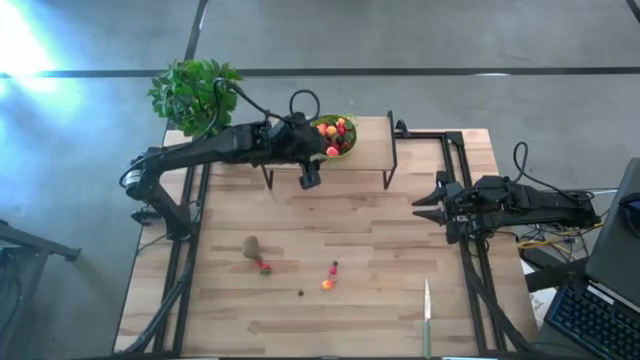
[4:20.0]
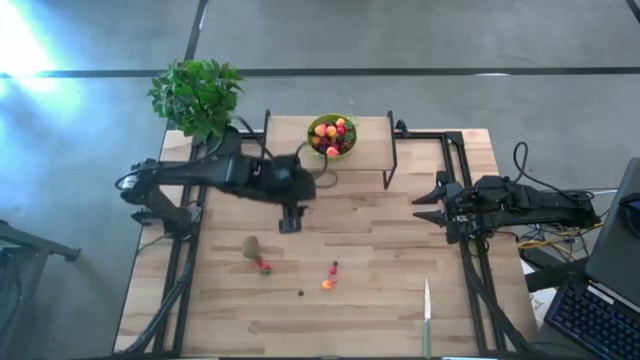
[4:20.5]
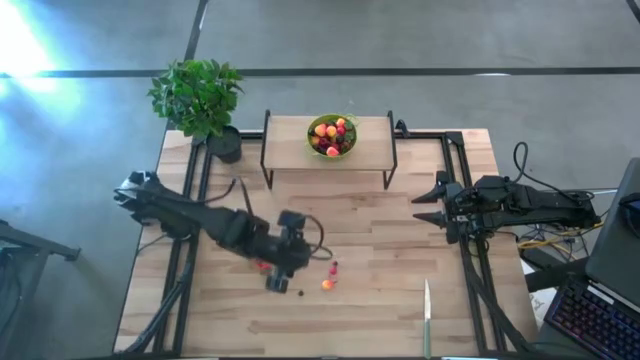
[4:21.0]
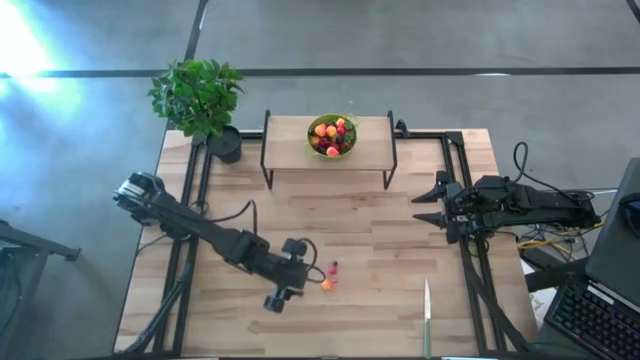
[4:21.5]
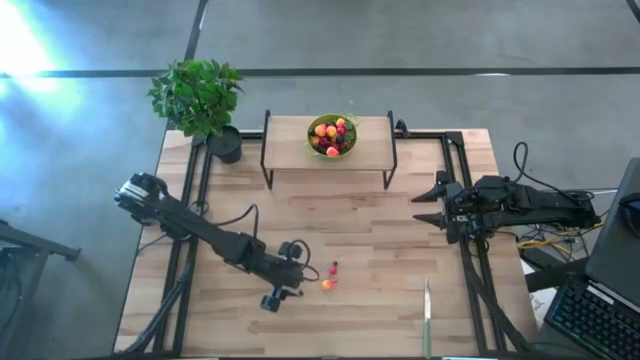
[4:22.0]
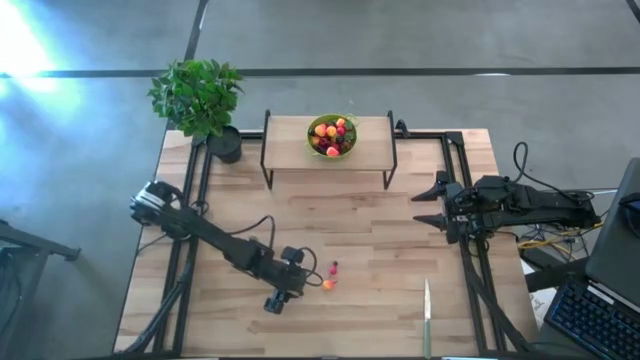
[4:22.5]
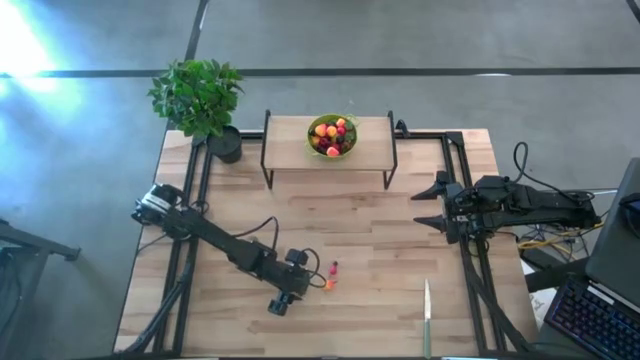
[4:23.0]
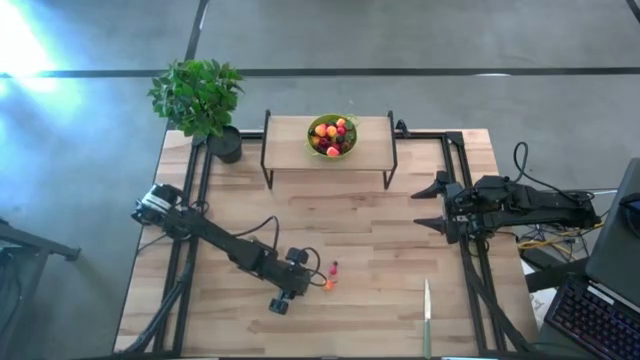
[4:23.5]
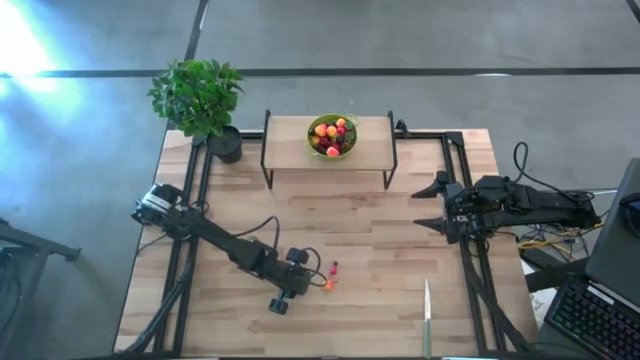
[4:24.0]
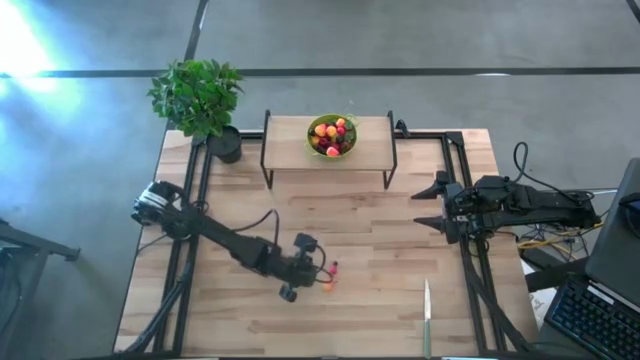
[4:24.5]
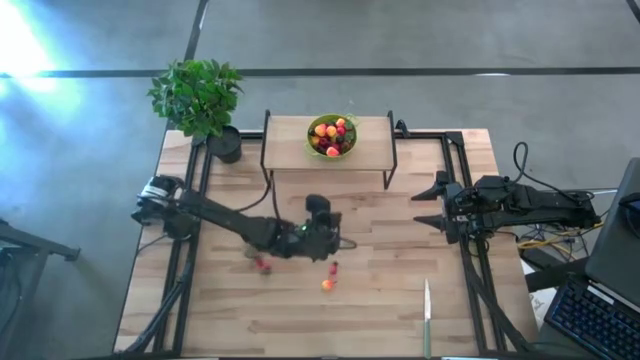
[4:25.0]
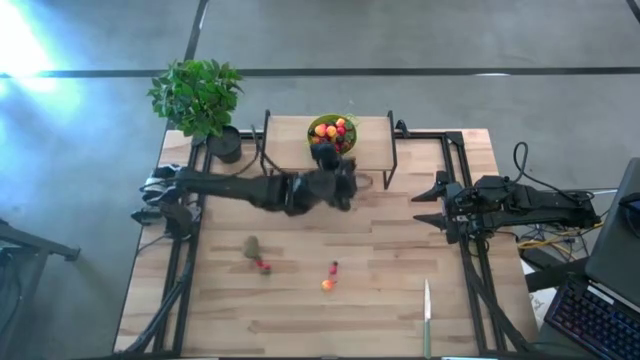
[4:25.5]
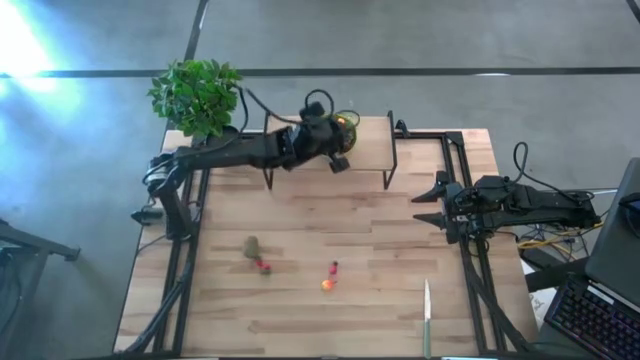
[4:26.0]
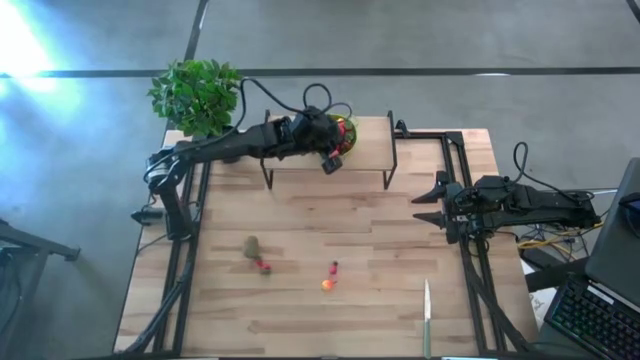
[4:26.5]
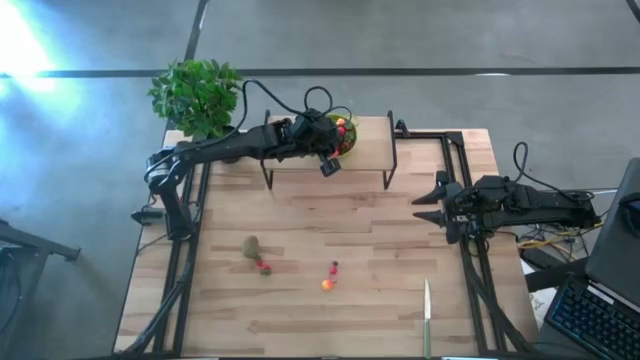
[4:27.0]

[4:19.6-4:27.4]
Task: Pick & Place Fruit
Put the blueberry into the green strainer bowl on the shelf

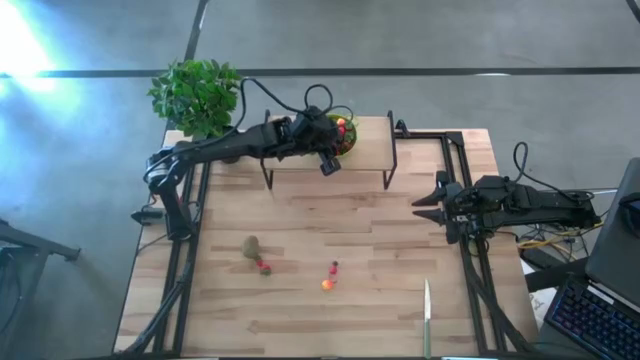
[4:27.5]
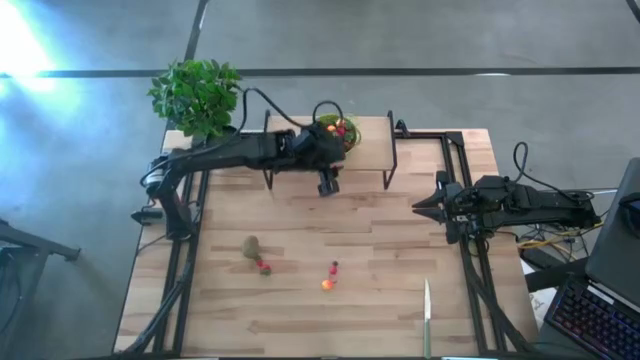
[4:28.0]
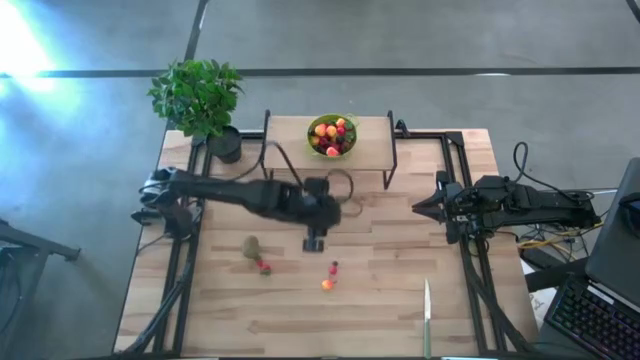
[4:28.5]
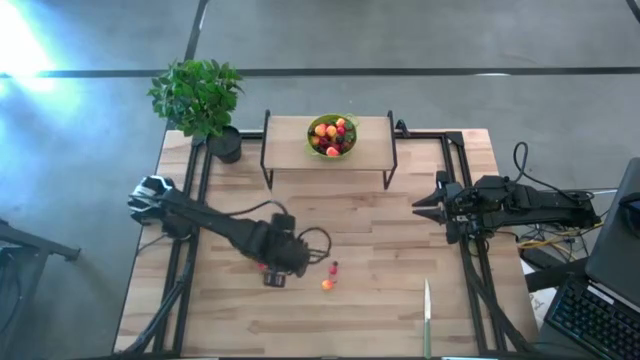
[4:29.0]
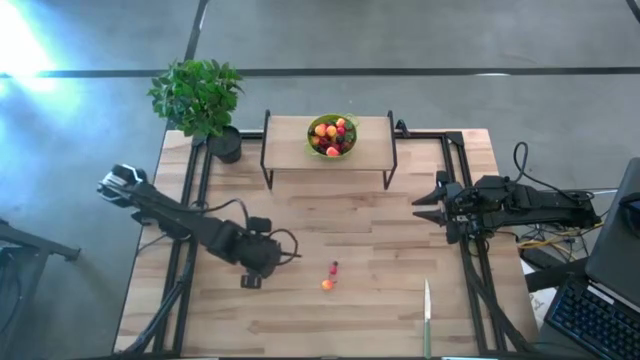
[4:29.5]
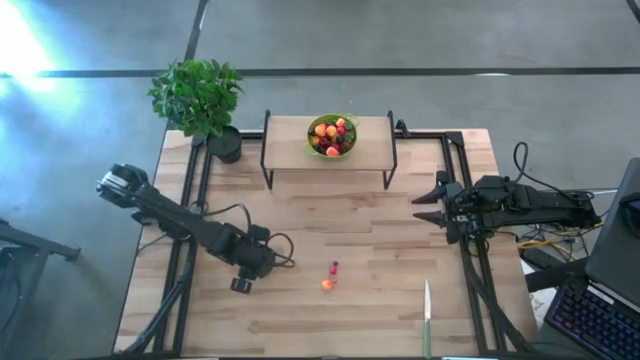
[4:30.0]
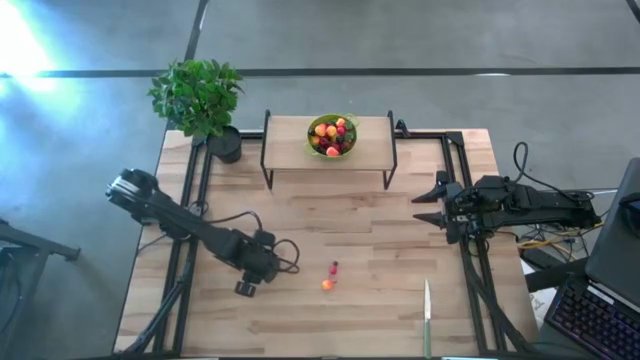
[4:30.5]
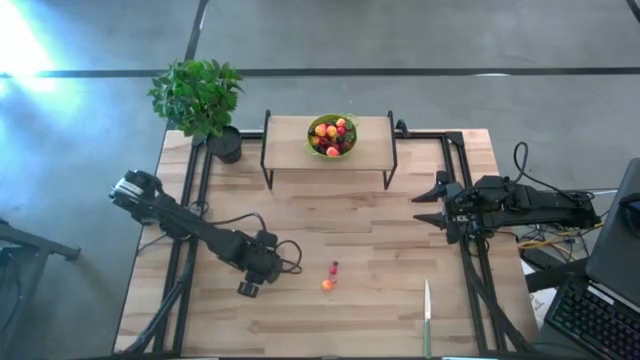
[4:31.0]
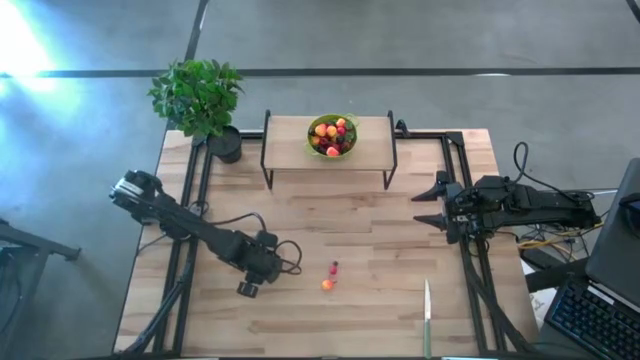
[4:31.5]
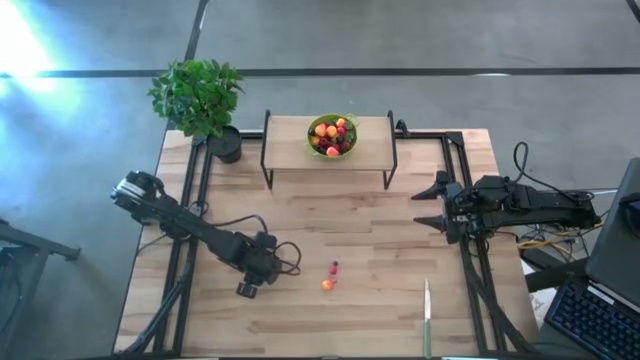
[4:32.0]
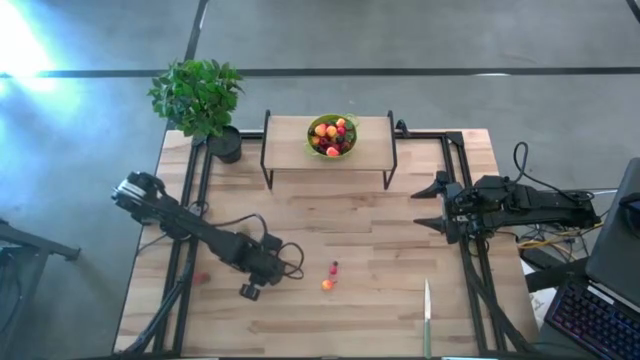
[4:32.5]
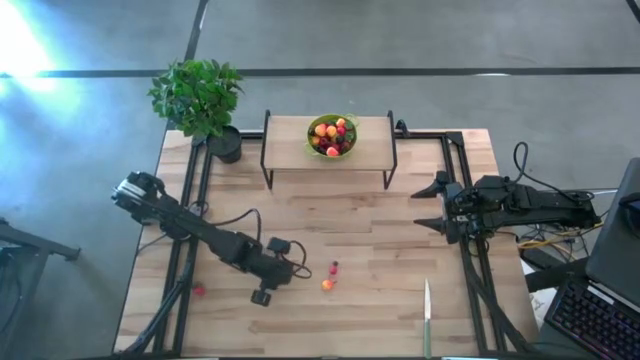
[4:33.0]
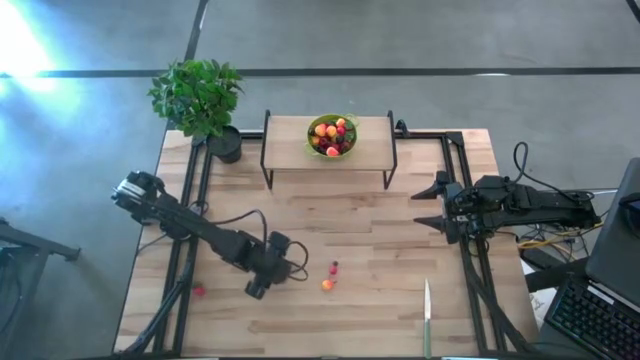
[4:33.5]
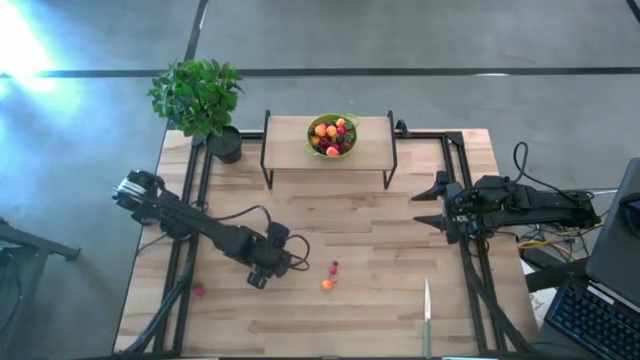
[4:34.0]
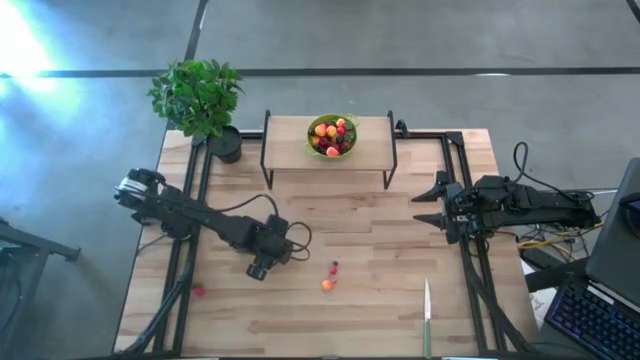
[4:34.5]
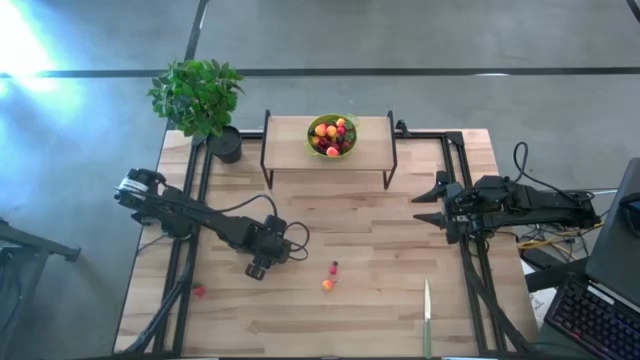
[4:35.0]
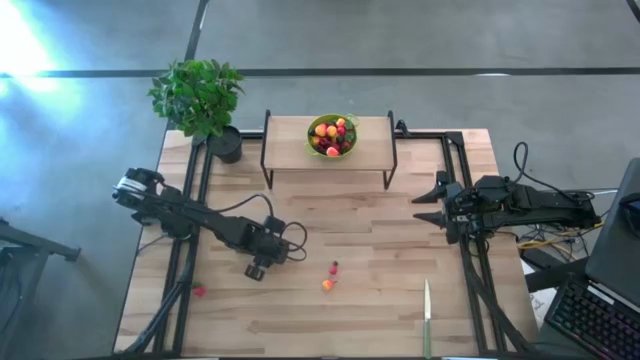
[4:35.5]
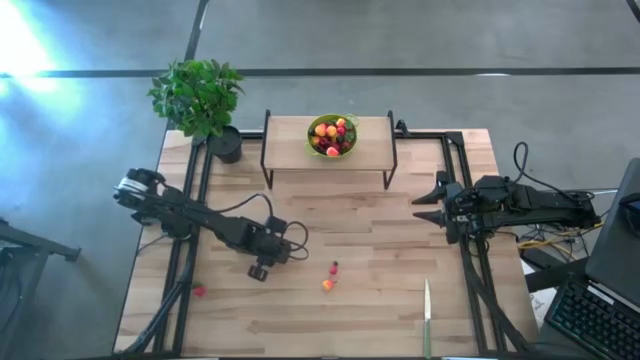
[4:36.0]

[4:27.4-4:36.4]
Put the red strawberry into the green strainer bowl on the shelf

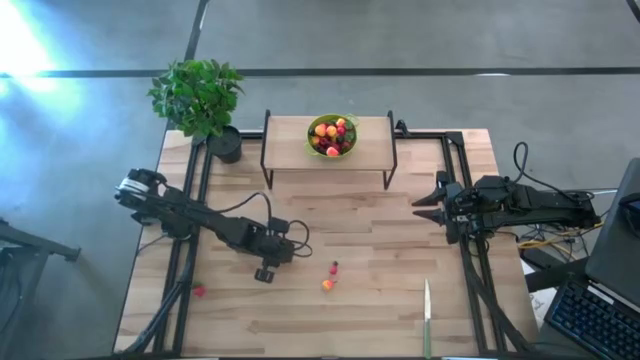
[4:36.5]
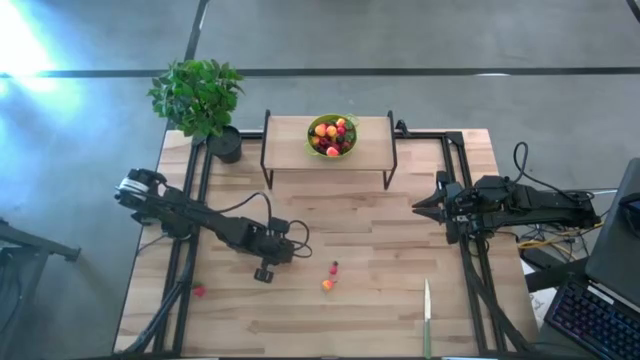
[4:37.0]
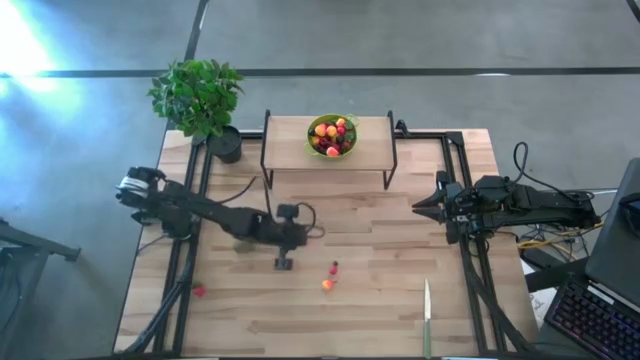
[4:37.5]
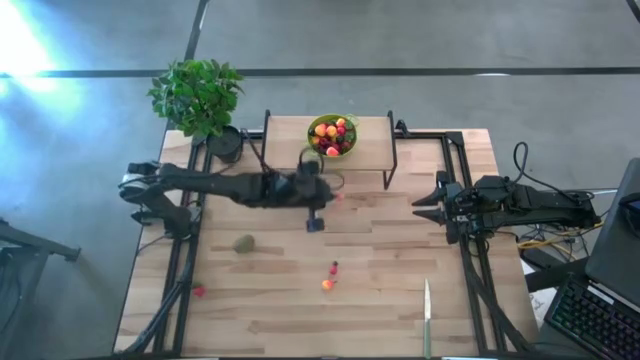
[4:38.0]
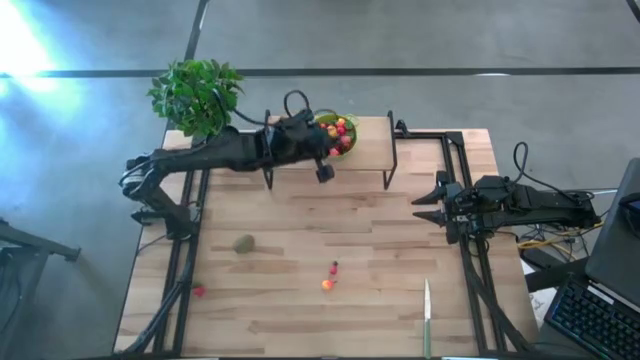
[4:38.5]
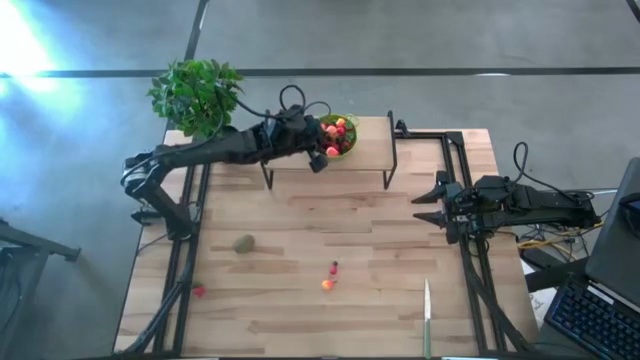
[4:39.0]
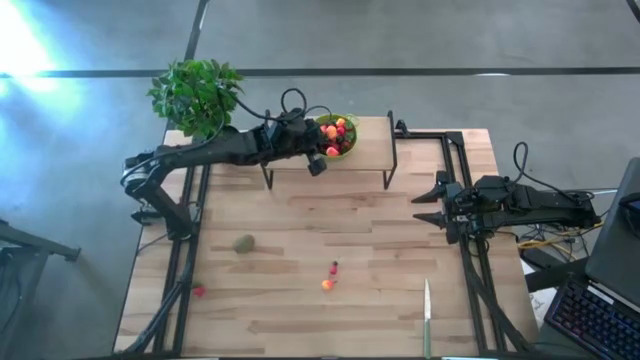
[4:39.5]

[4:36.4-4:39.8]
Put the red strawberry into the green strainer bowl on the shelf

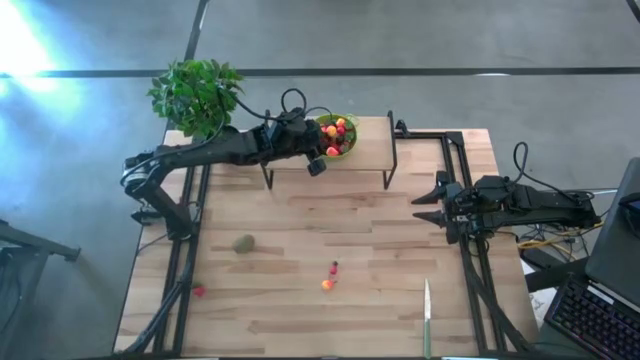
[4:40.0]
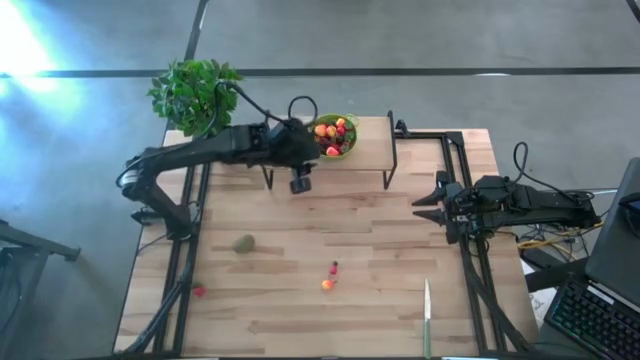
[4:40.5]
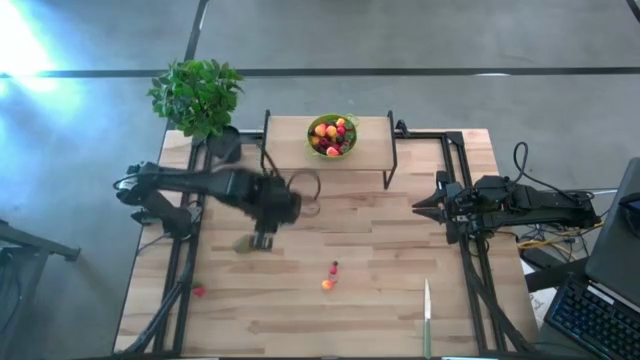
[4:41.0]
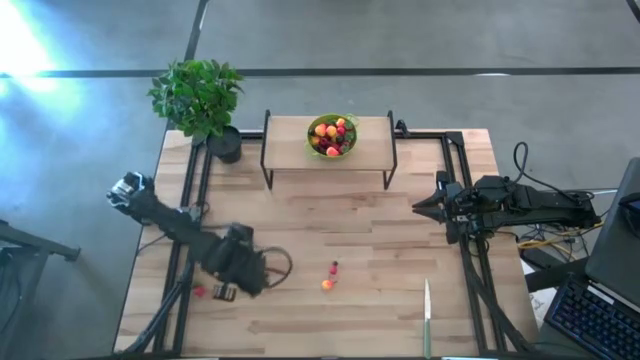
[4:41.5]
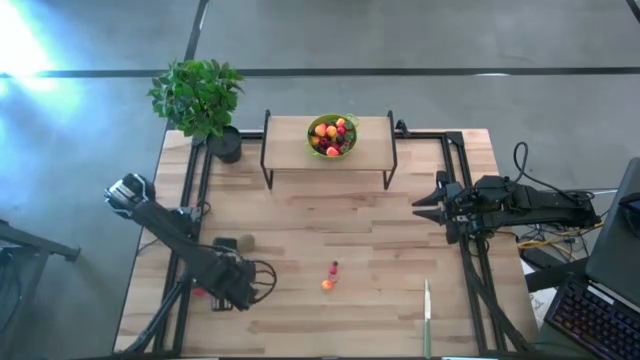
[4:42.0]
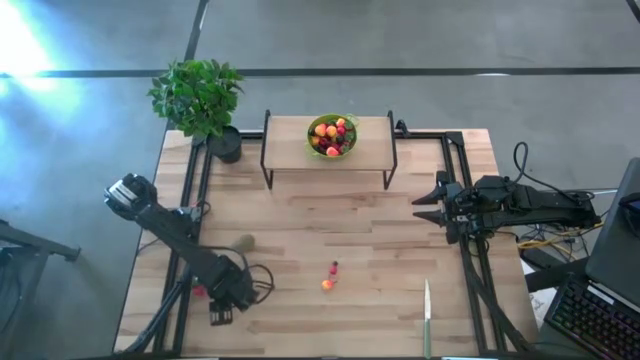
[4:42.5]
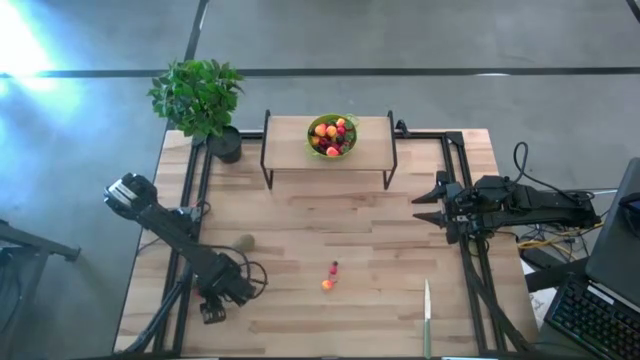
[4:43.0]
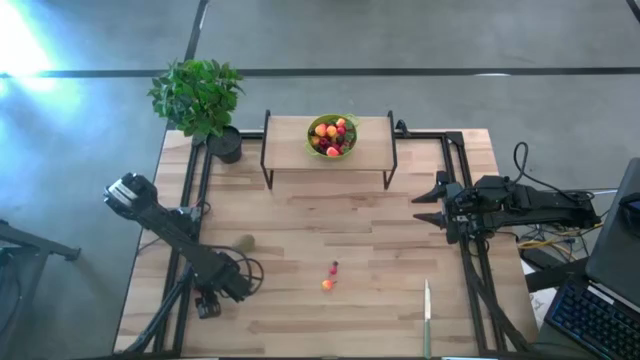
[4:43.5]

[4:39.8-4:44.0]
Put the red strawberry into the green strainer bowl on the shelf
